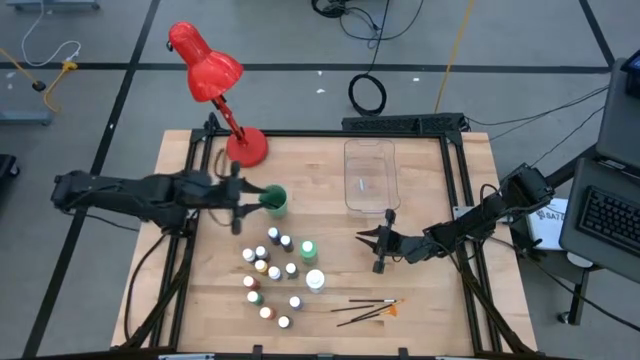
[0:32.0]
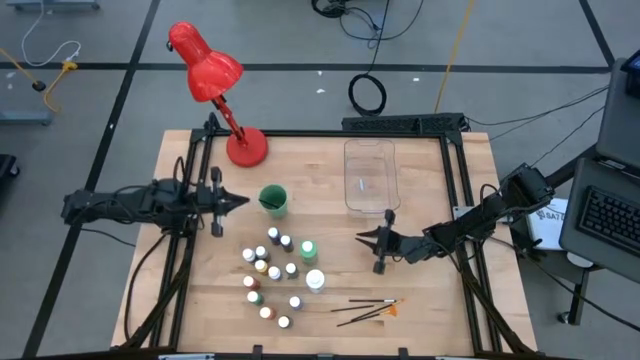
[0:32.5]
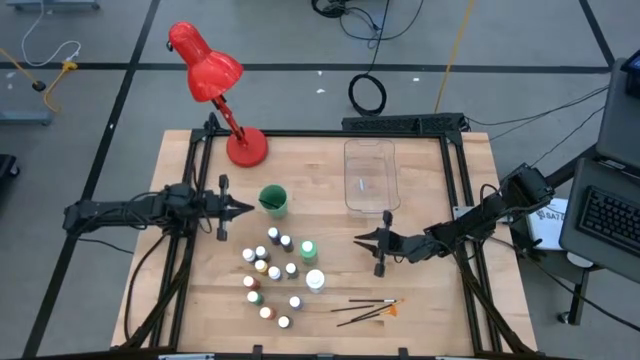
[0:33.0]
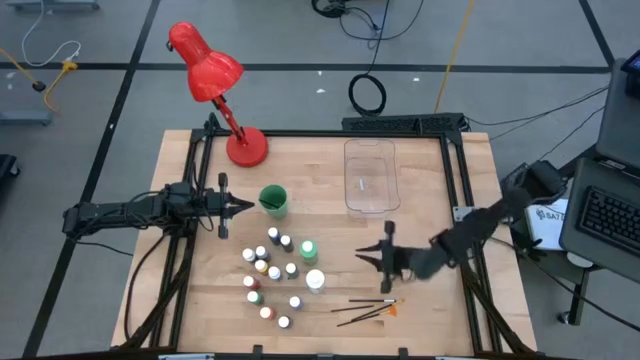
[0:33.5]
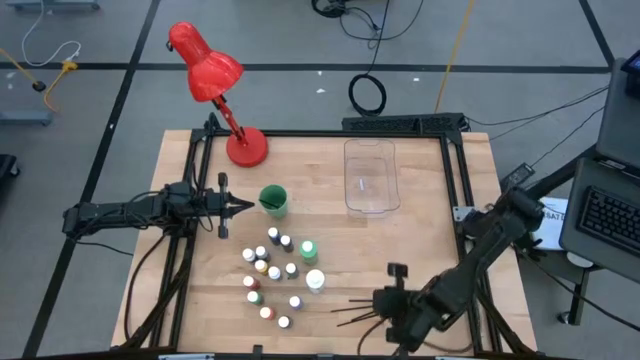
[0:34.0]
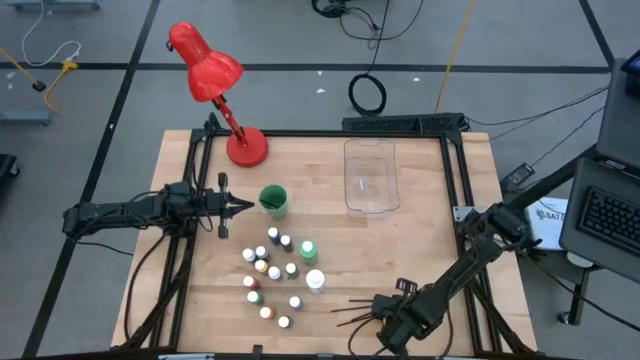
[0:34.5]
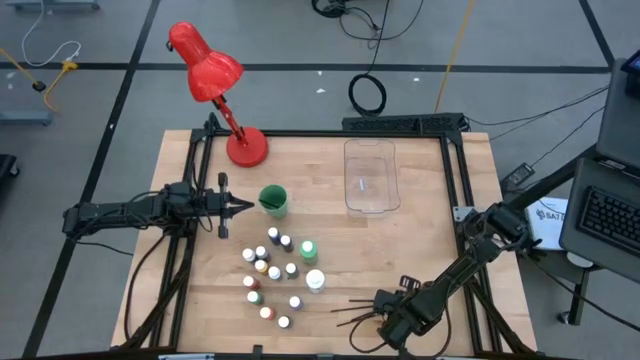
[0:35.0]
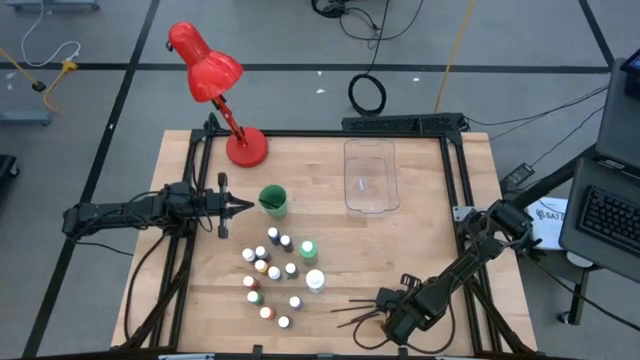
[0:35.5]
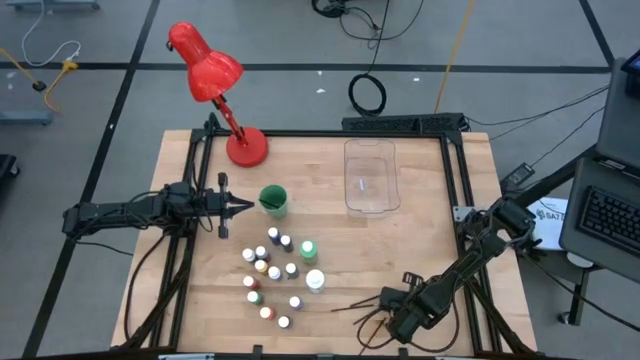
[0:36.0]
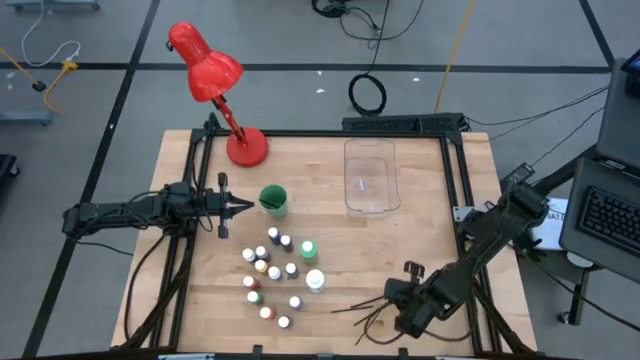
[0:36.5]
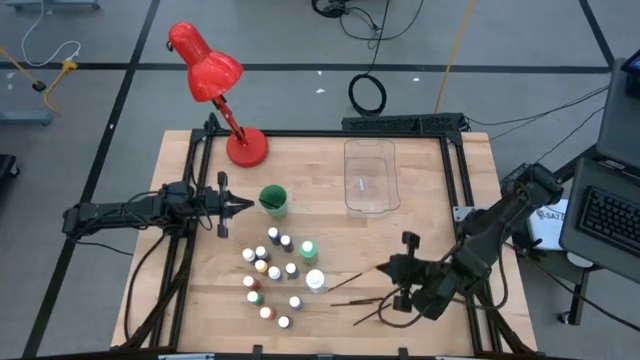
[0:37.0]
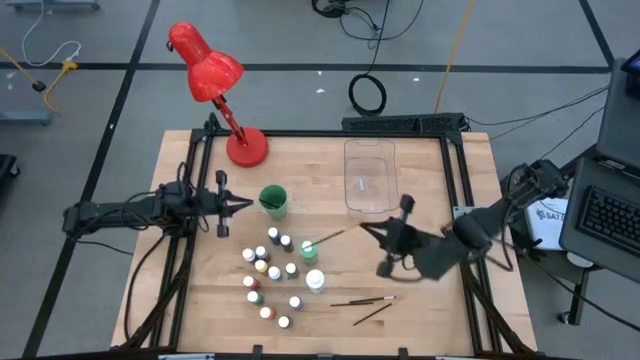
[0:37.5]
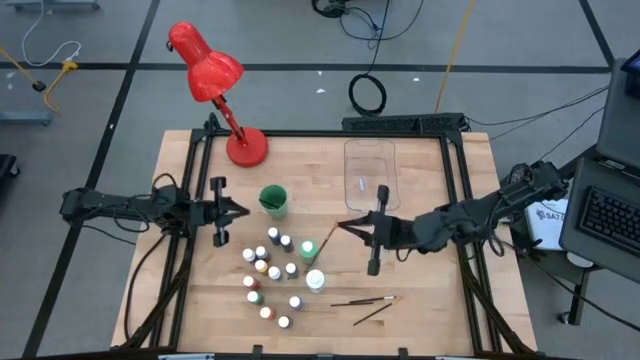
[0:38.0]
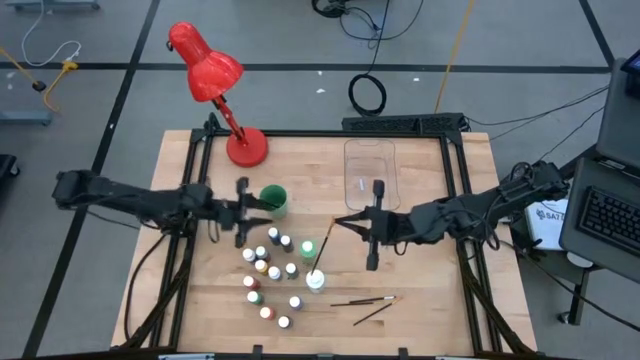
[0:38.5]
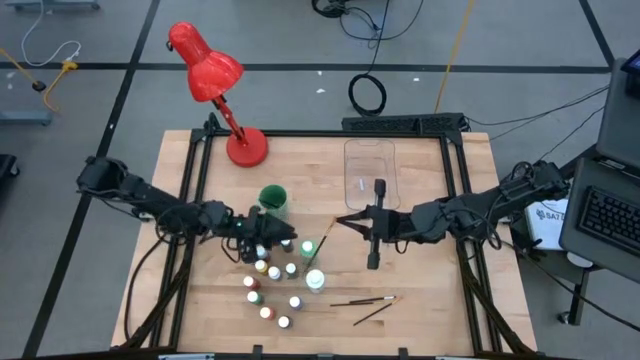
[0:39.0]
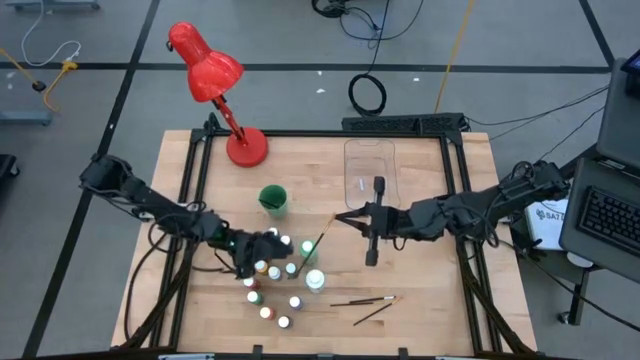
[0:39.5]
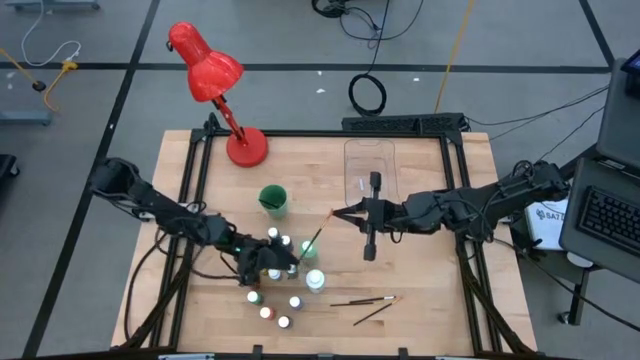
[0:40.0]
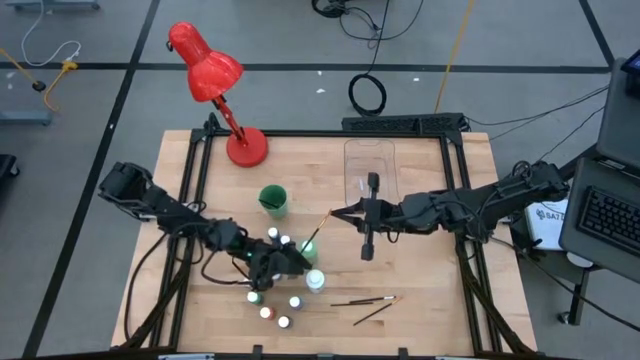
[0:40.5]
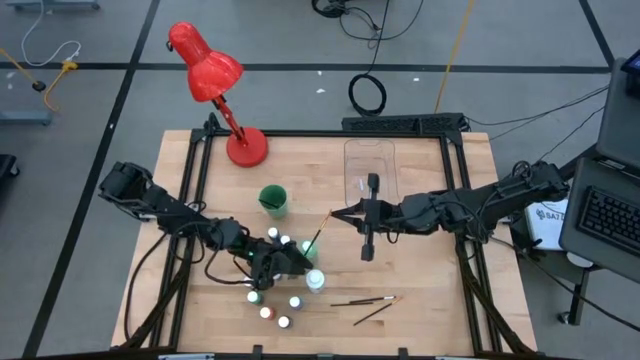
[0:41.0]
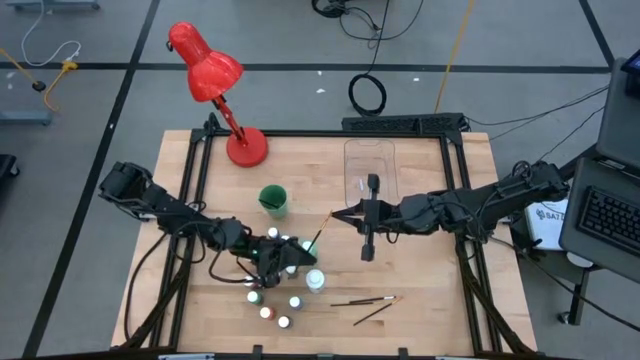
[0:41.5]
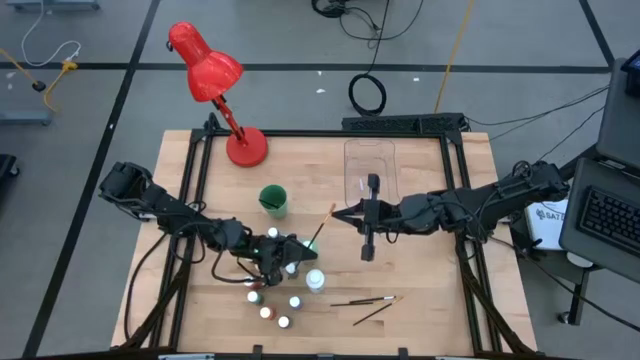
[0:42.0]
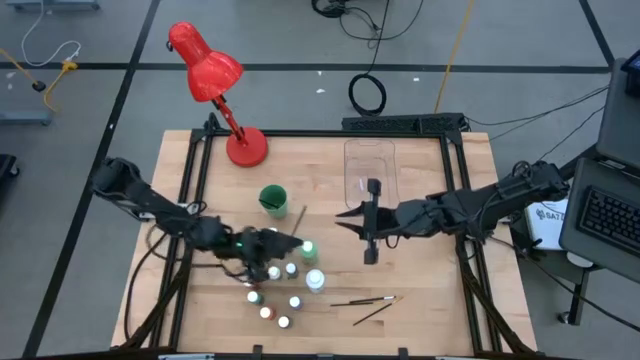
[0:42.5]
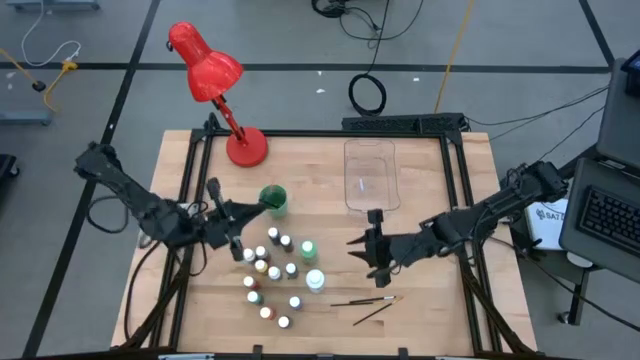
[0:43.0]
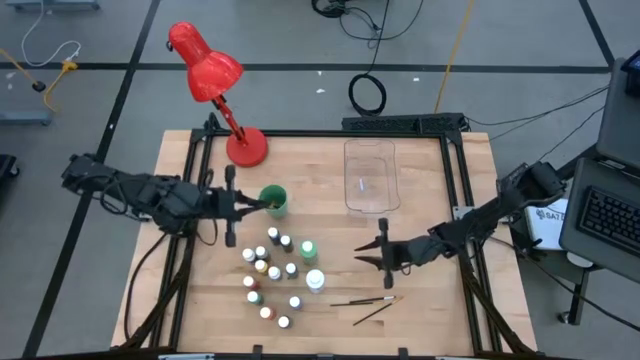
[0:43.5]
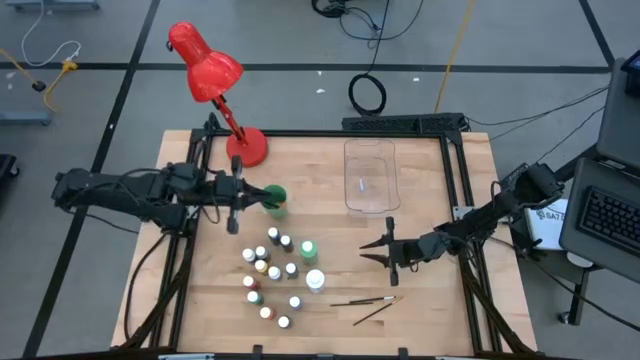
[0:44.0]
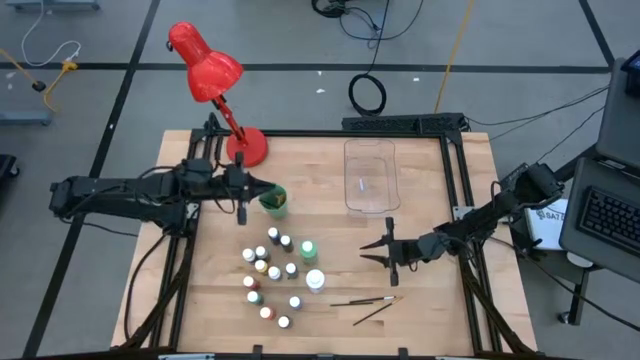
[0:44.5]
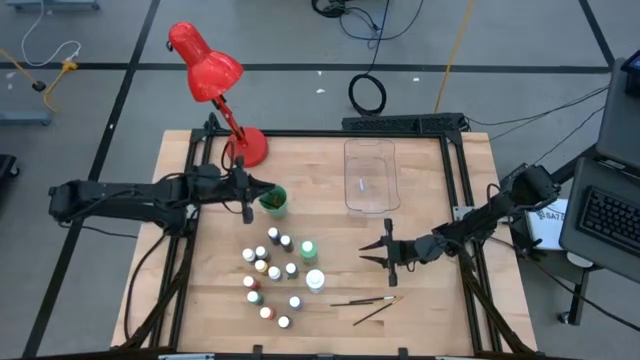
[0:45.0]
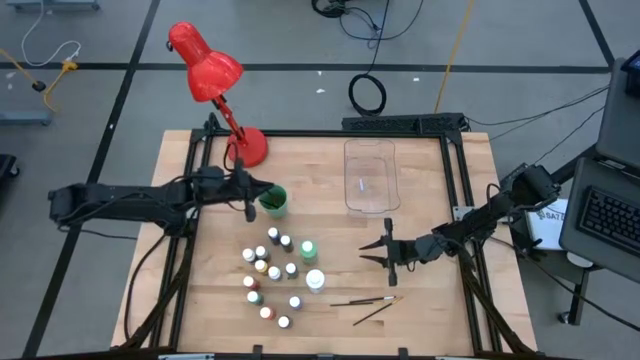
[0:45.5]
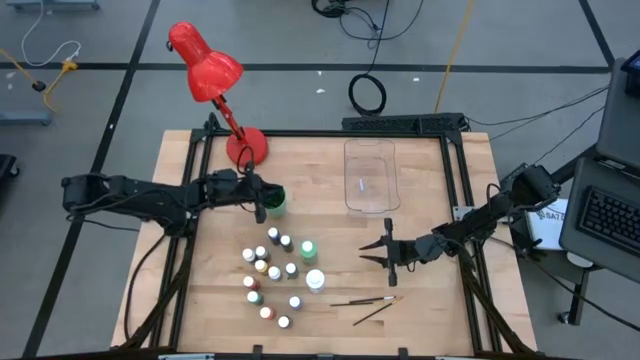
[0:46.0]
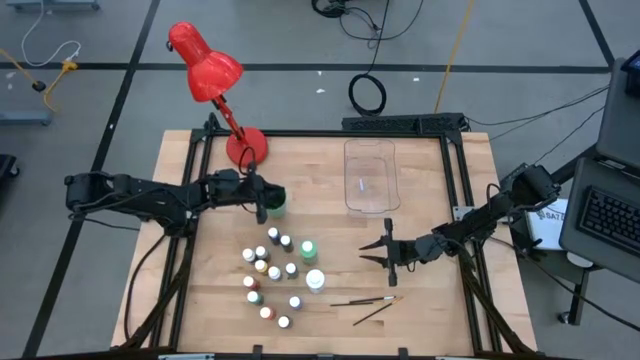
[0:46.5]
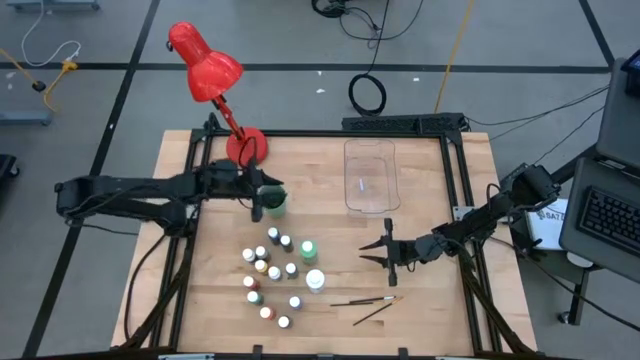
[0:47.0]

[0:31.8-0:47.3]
Task: Pick & Place Paint Supplies
Put the gold paintbrush into the green cup

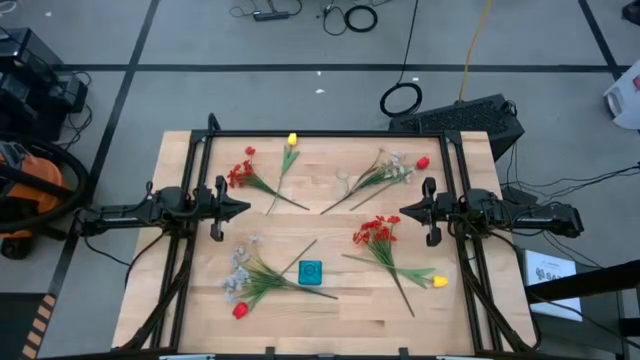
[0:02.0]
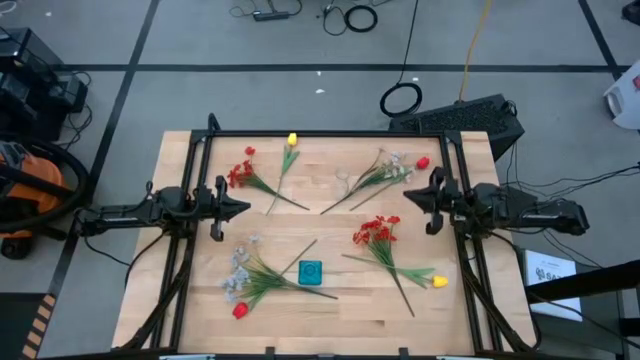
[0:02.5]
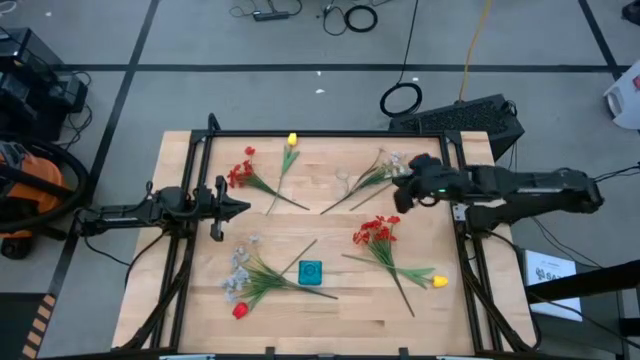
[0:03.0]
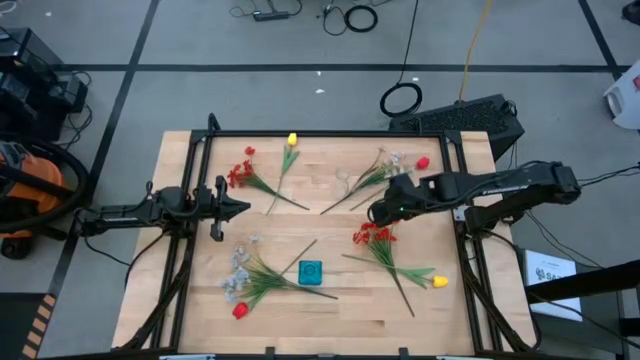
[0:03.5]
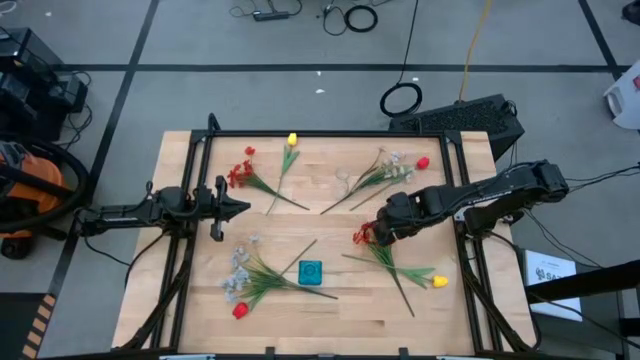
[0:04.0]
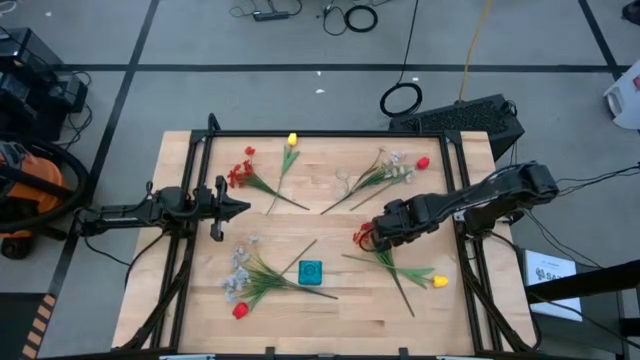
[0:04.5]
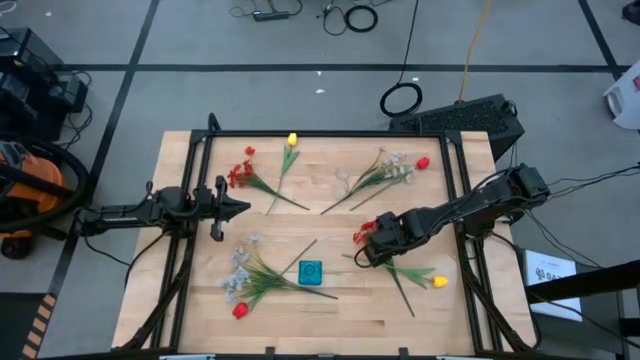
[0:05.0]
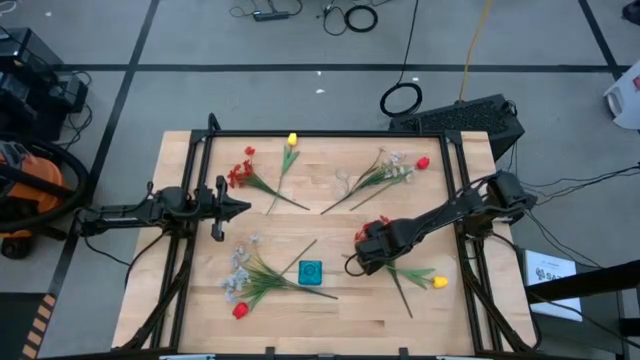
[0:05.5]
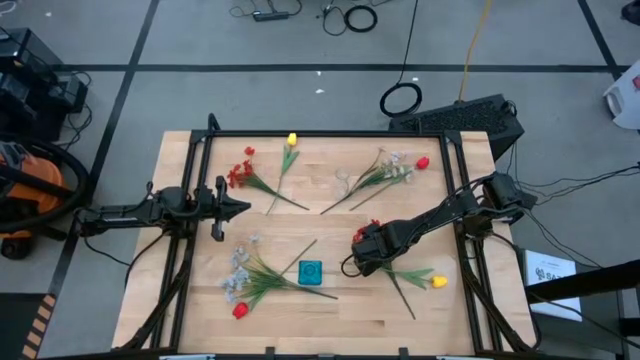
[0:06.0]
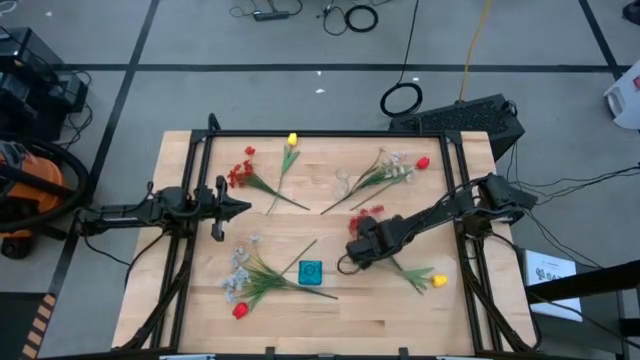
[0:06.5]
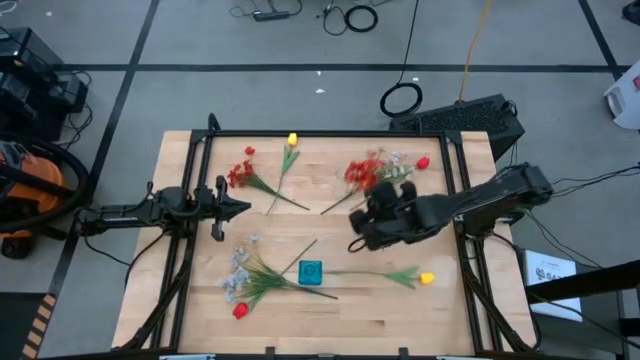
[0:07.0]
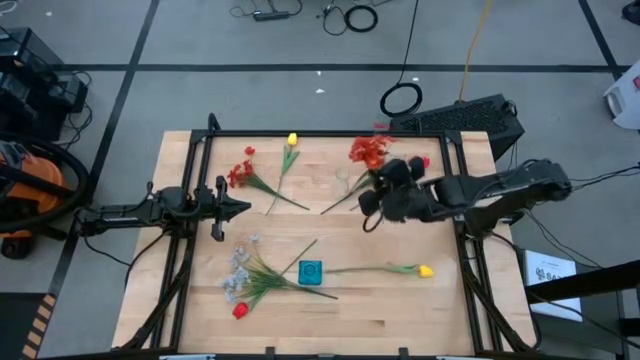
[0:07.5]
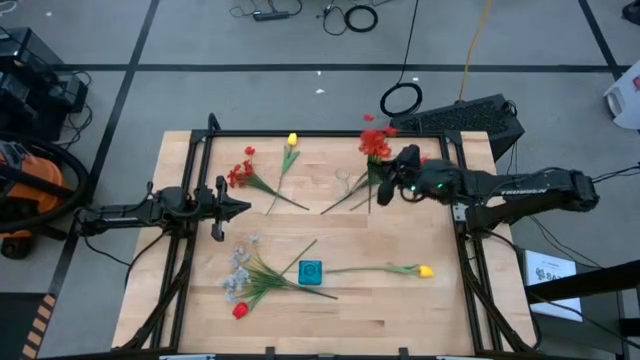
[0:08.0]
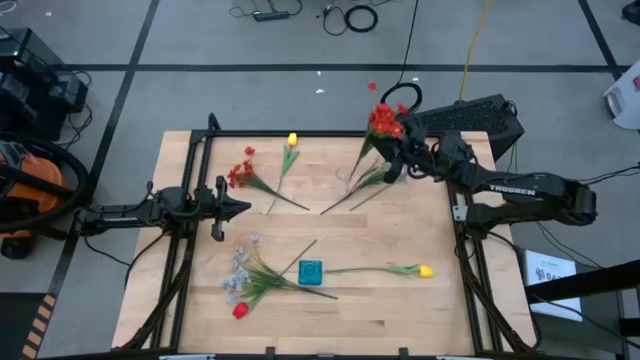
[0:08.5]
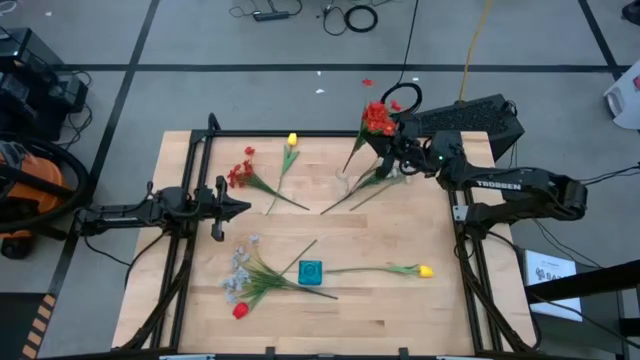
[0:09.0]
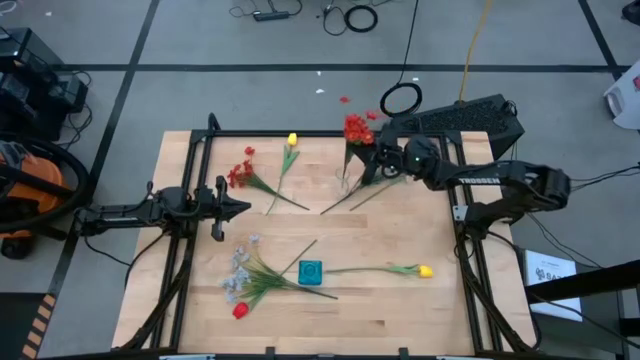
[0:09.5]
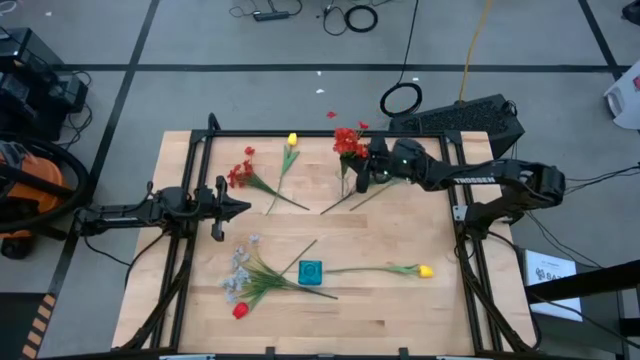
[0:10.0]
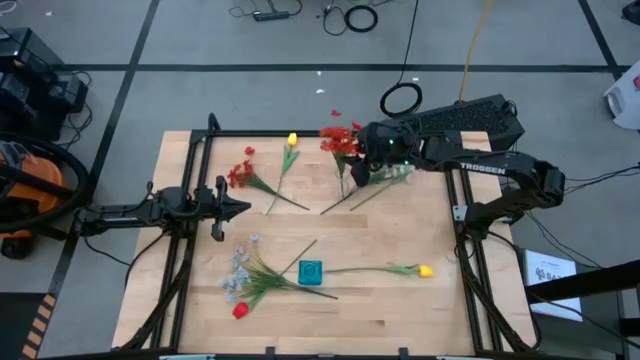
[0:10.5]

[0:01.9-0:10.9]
Task: Sort flowers into vase by color
Put the bottom red flowers into the transparent flower vase
